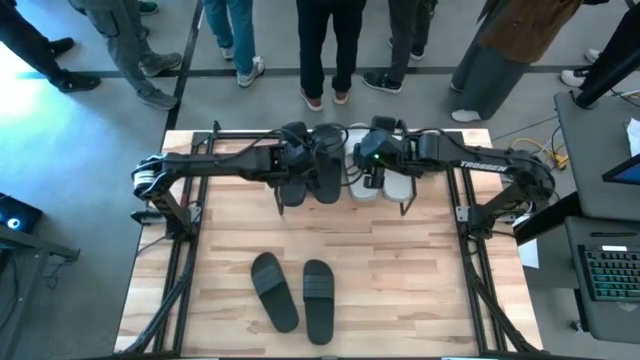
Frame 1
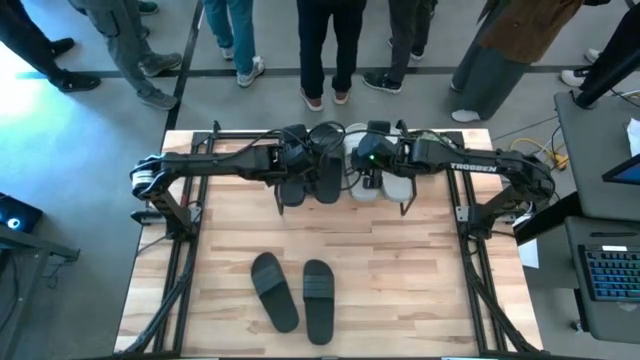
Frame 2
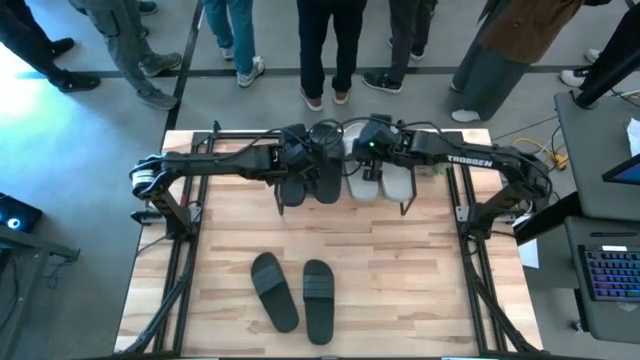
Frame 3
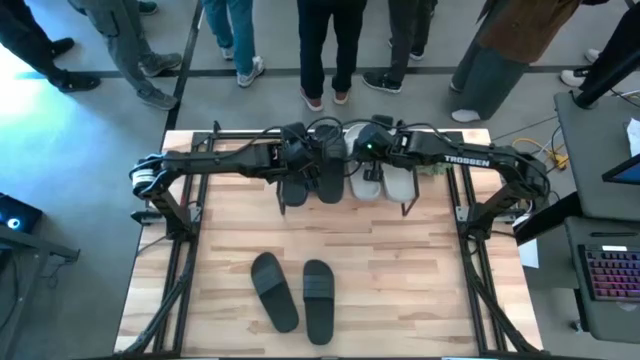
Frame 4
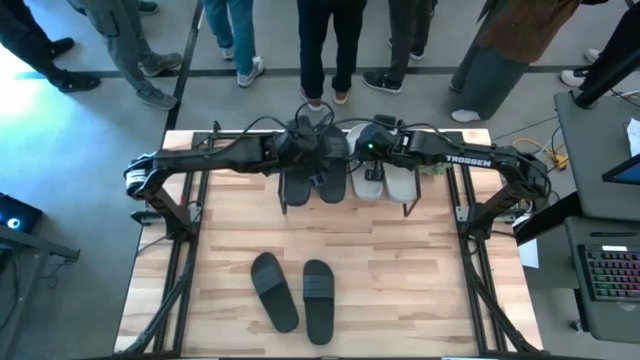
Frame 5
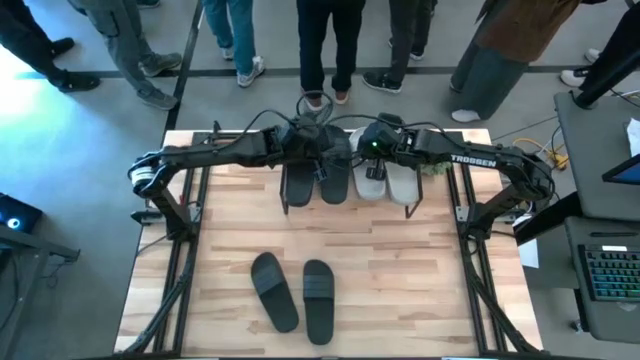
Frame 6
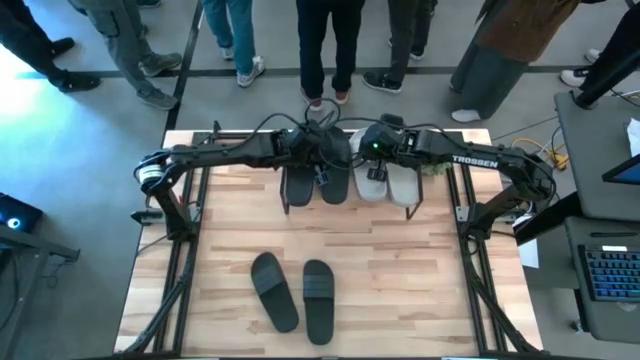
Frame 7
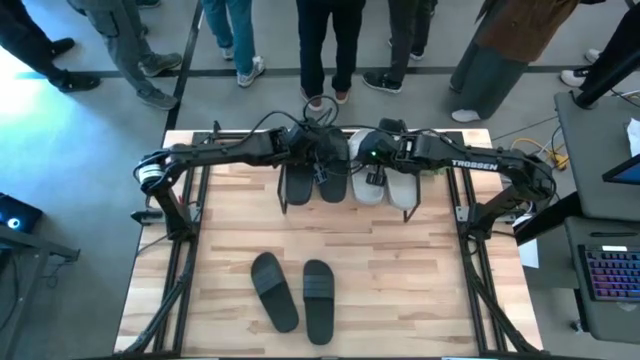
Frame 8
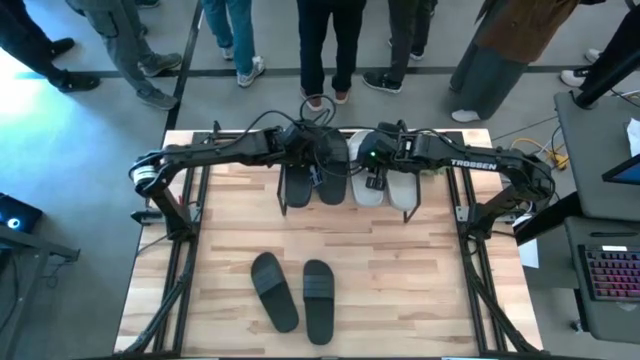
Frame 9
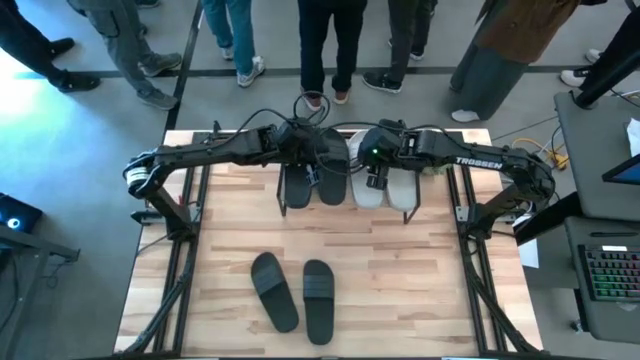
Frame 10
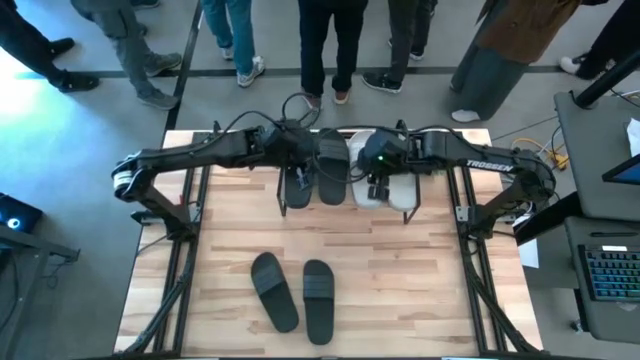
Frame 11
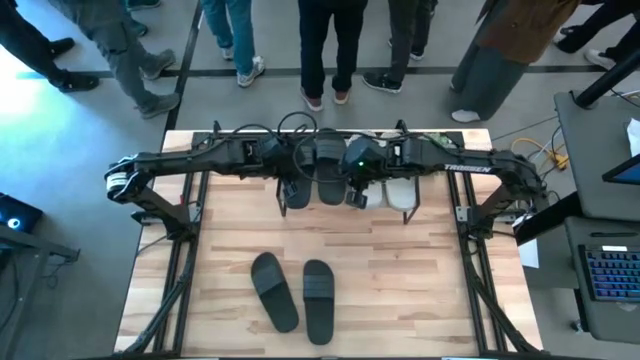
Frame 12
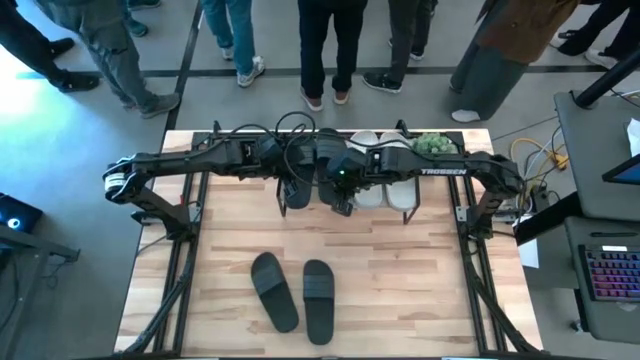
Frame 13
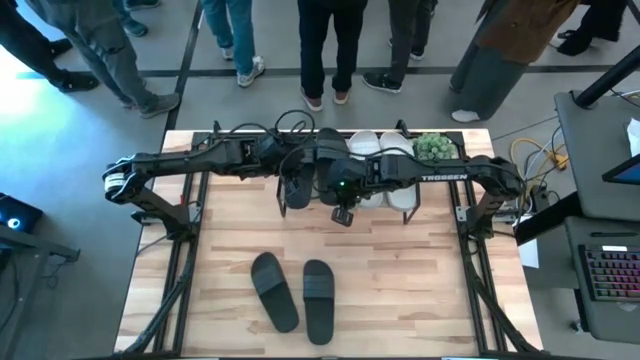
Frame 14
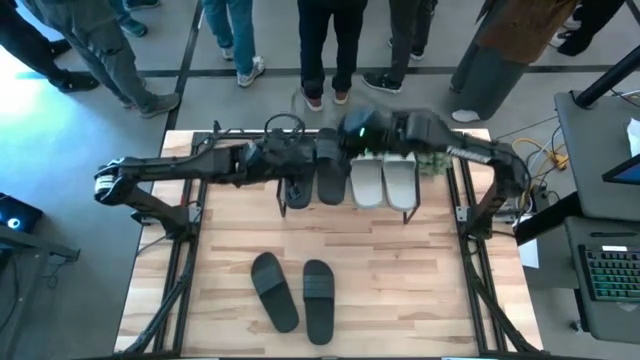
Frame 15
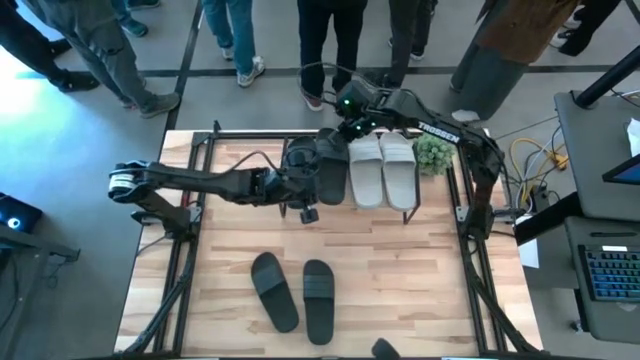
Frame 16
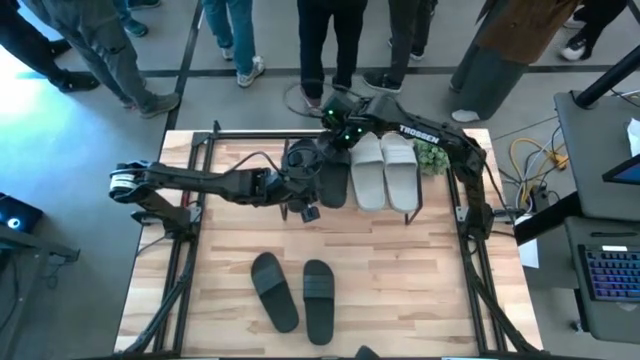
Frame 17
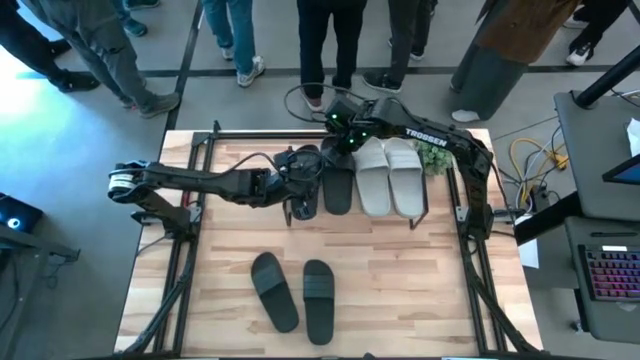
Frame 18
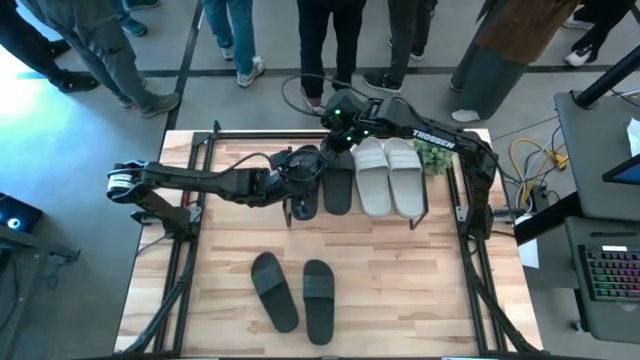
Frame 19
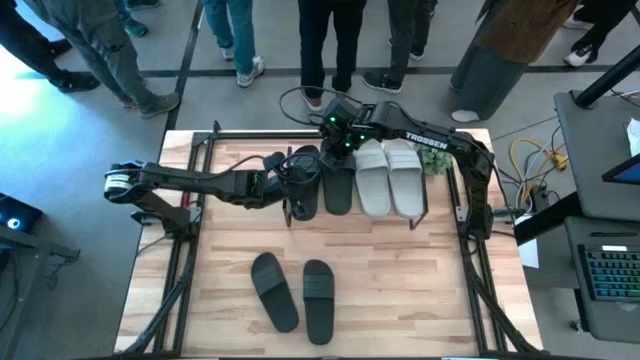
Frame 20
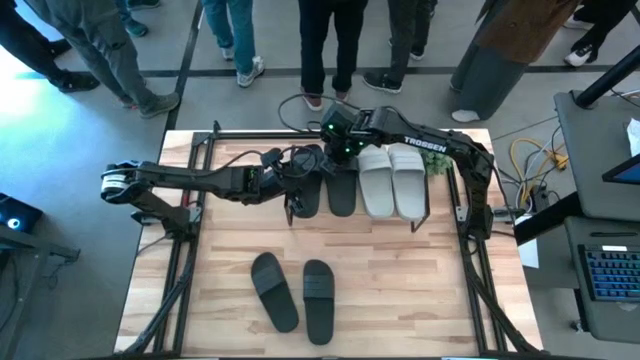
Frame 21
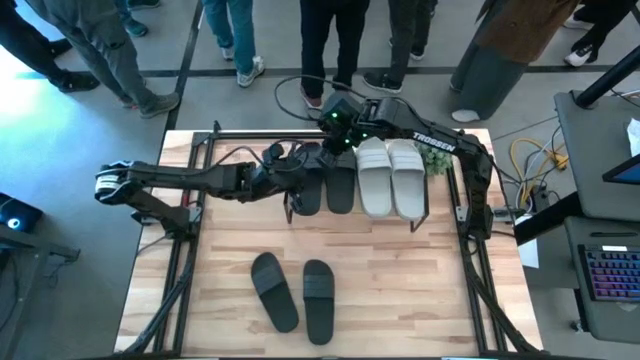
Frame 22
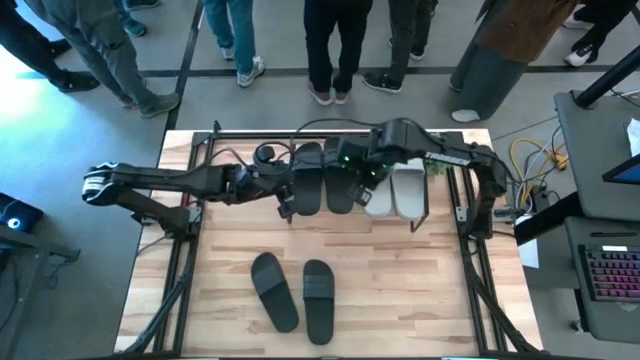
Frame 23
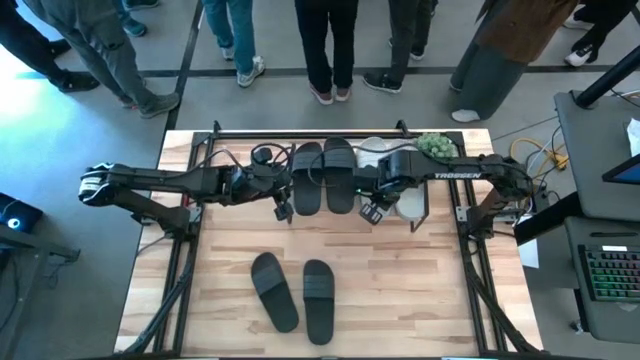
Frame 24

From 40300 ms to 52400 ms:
Task: Pick and place slides into the shelf
Adjust the slides on the shelf

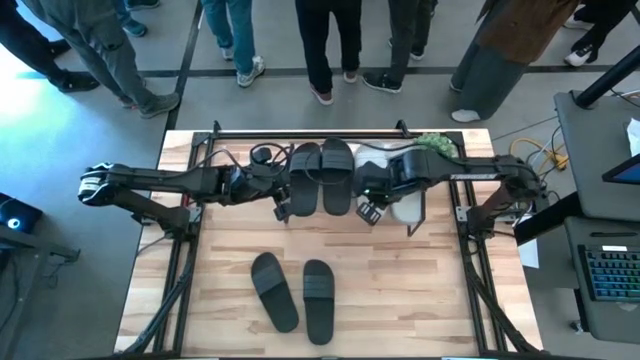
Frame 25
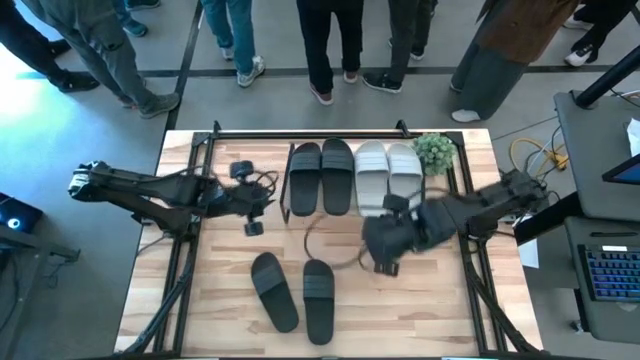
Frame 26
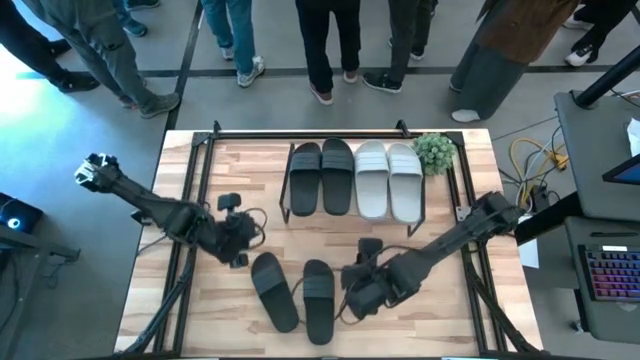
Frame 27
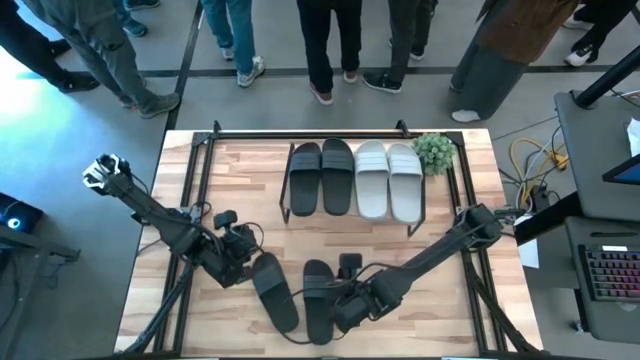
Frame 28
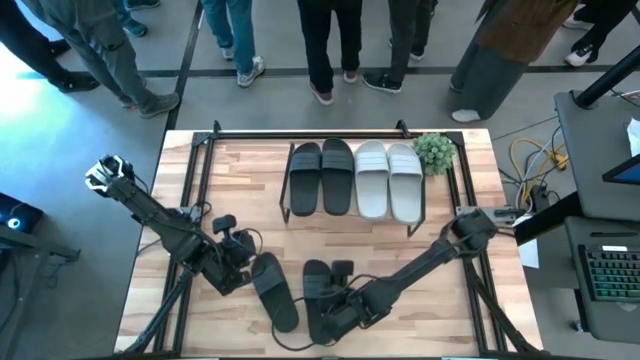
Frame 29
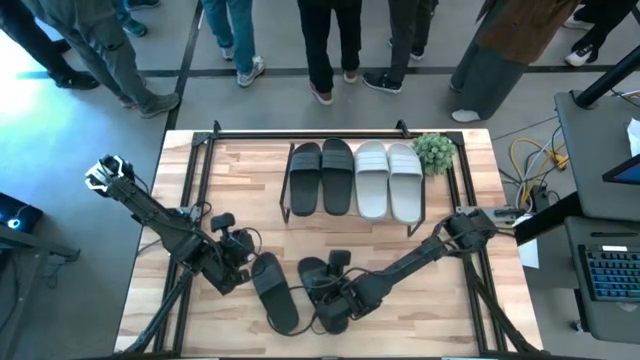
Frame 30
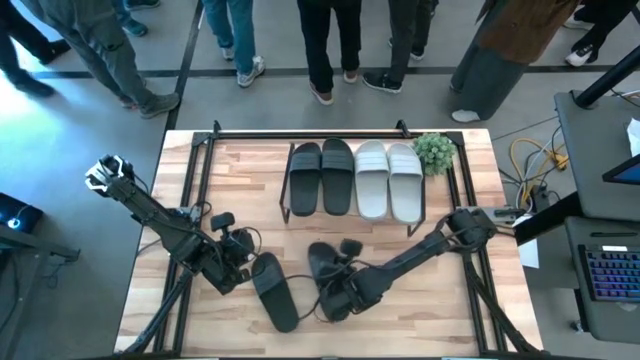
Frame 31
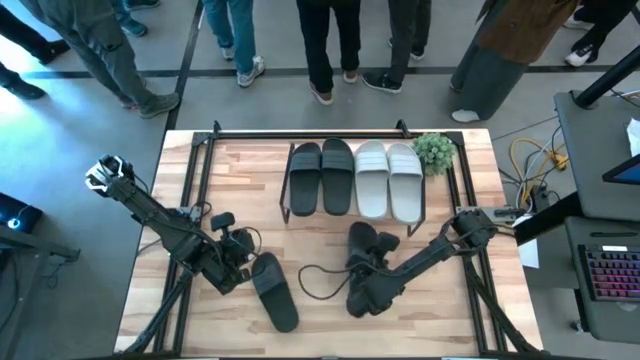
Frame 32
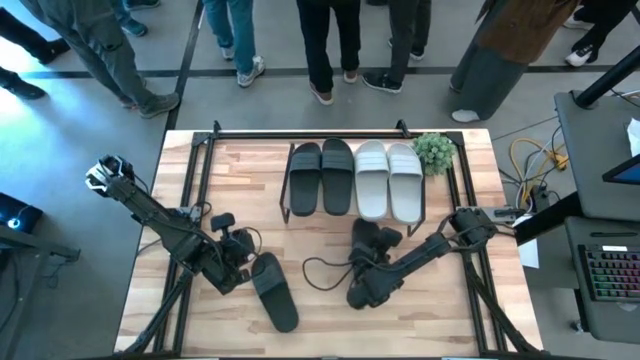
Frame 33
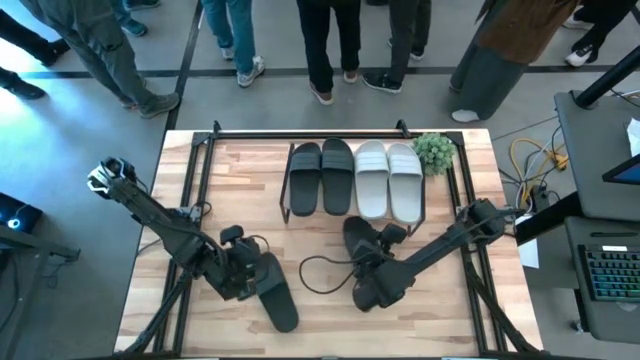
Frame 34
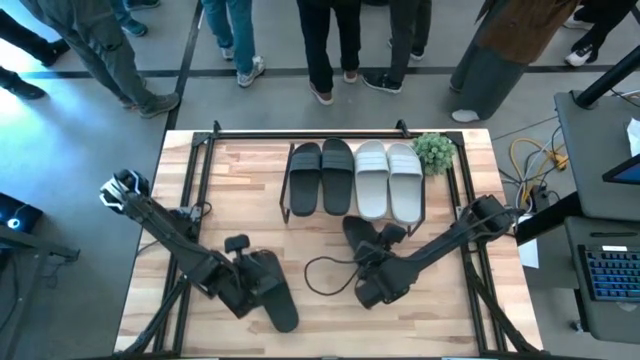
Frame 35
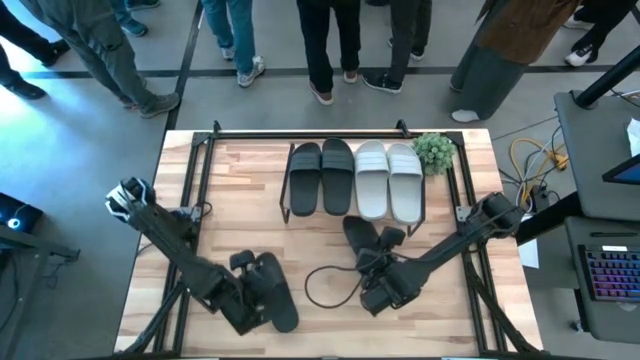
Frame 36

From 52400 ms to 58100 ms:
Put the black slide under the shelf

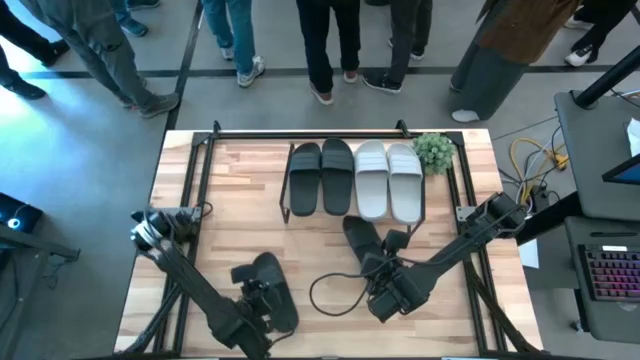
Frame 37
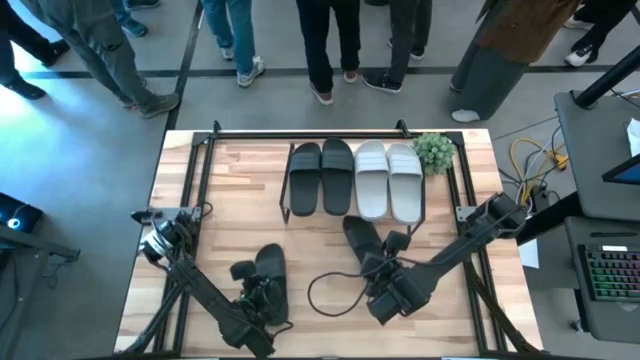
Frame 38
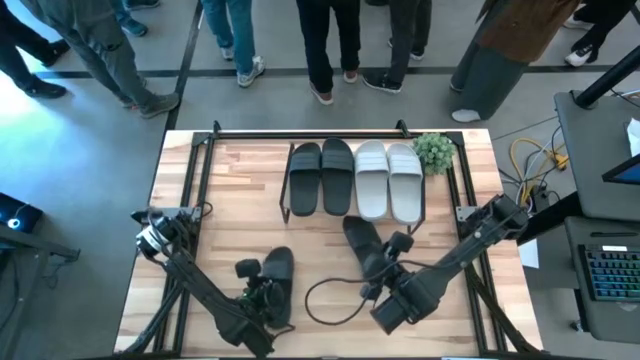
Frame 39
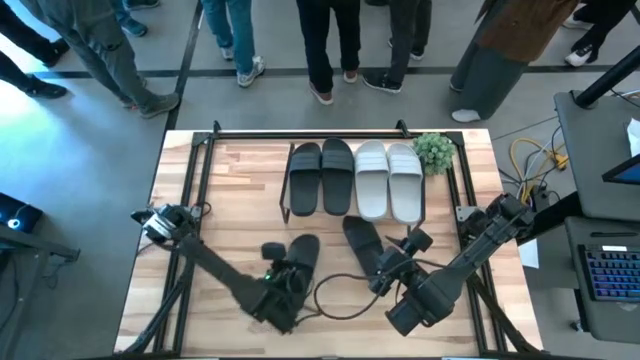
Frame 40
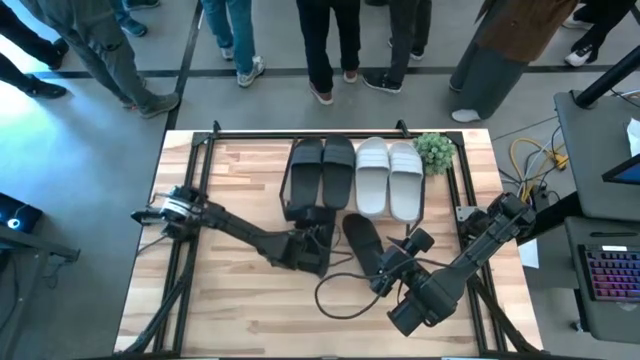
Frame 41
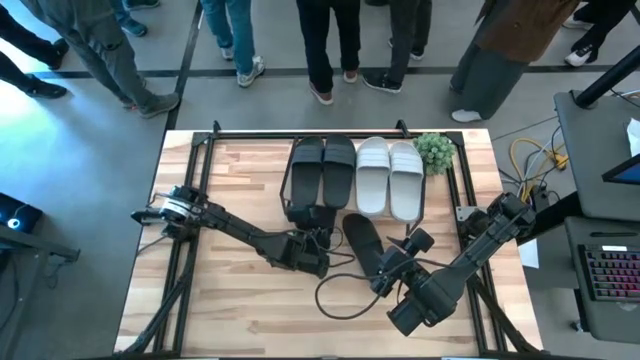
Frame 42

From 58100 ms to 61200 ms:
Put the black slide under the shelf
